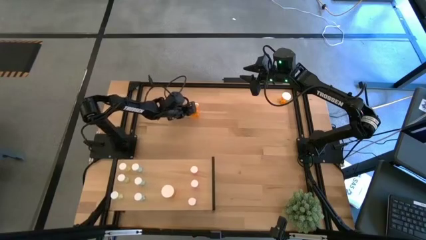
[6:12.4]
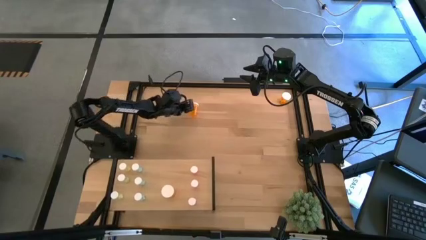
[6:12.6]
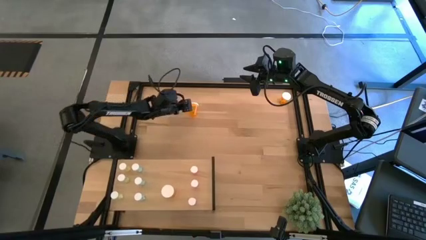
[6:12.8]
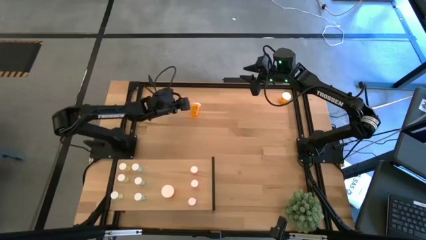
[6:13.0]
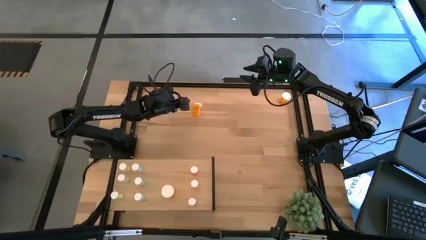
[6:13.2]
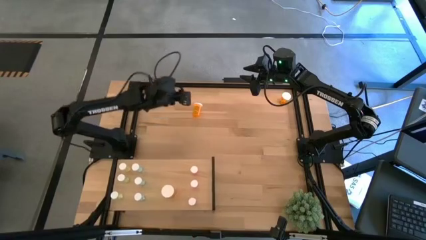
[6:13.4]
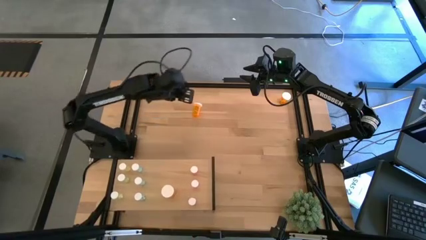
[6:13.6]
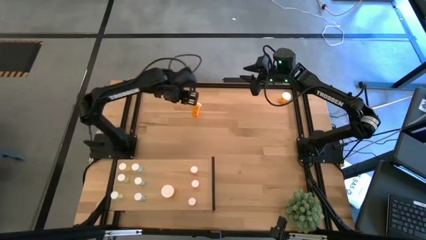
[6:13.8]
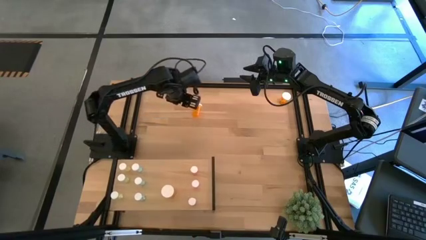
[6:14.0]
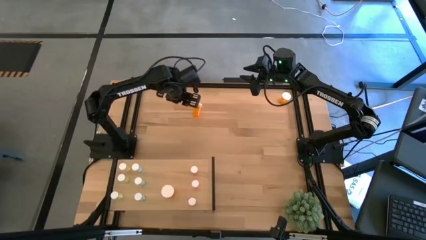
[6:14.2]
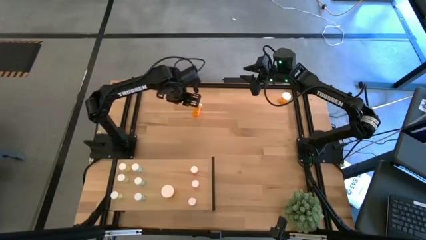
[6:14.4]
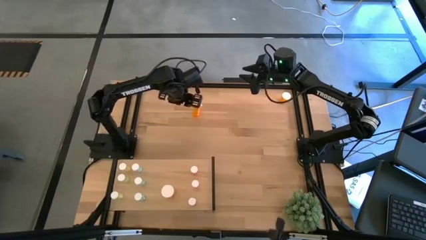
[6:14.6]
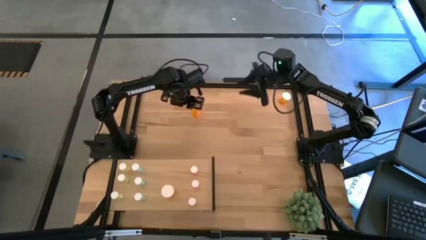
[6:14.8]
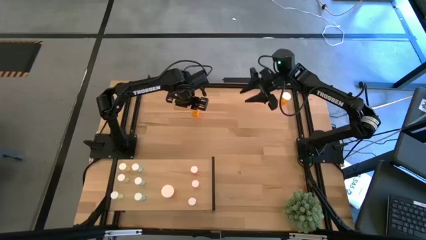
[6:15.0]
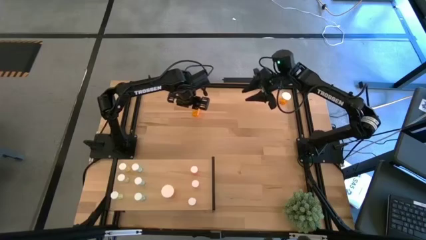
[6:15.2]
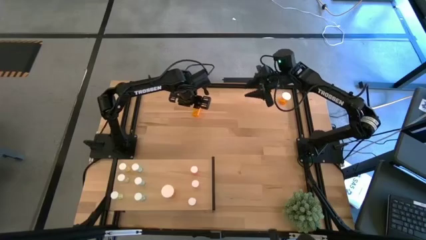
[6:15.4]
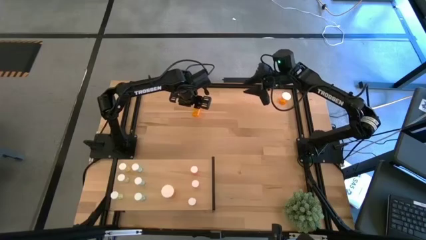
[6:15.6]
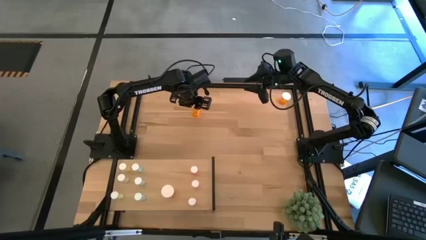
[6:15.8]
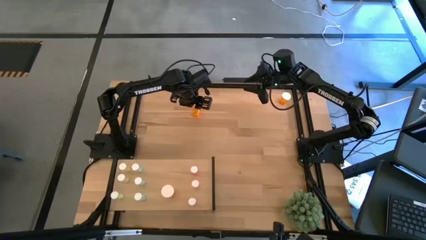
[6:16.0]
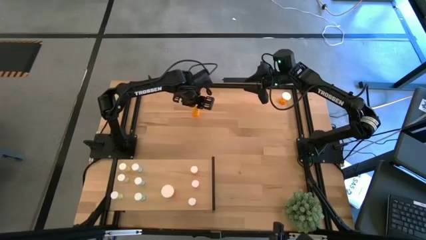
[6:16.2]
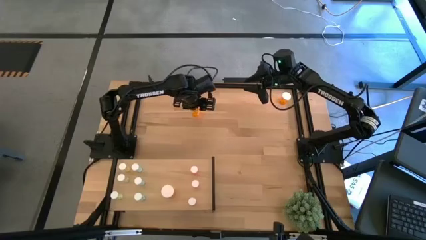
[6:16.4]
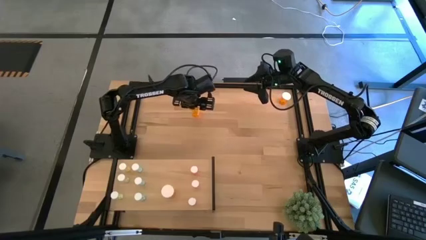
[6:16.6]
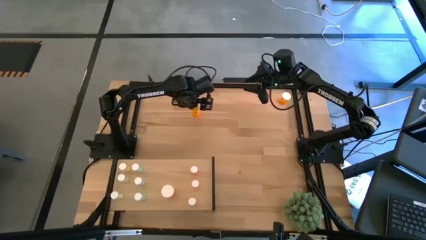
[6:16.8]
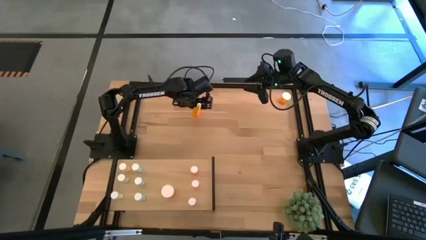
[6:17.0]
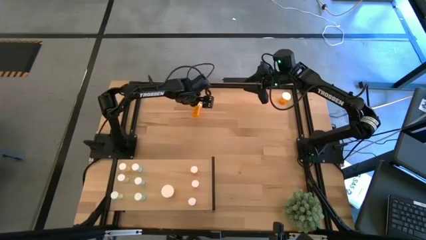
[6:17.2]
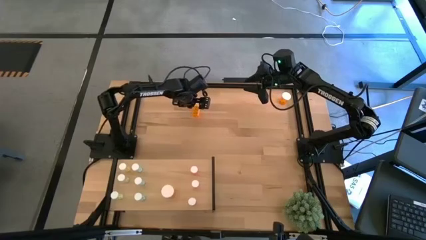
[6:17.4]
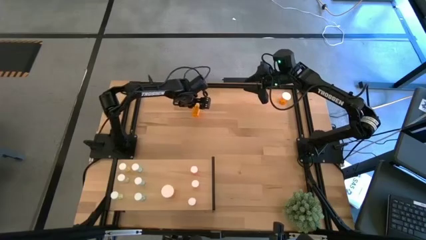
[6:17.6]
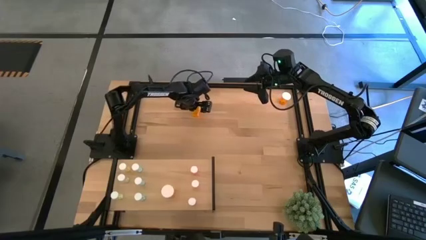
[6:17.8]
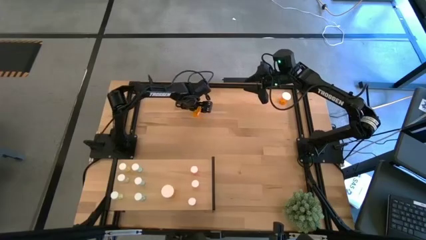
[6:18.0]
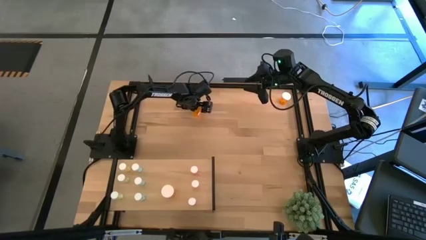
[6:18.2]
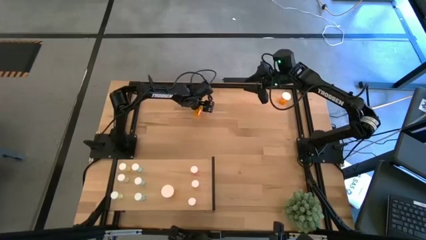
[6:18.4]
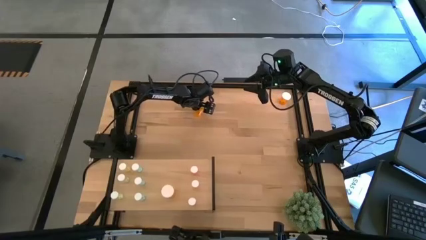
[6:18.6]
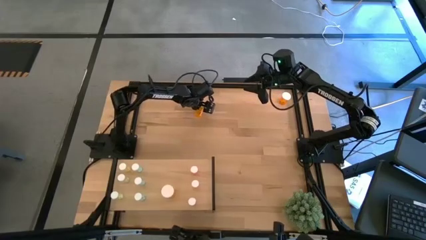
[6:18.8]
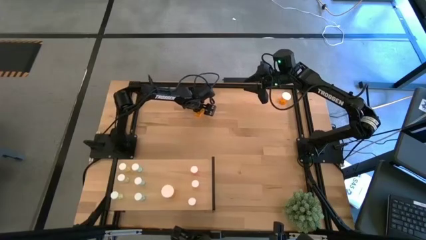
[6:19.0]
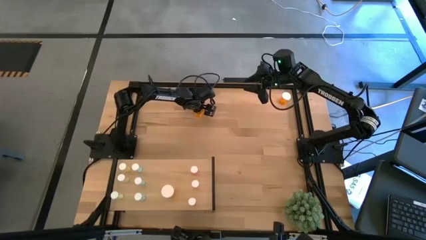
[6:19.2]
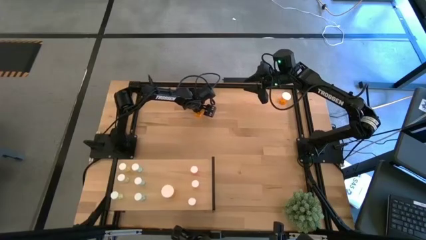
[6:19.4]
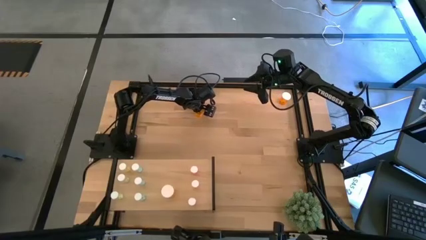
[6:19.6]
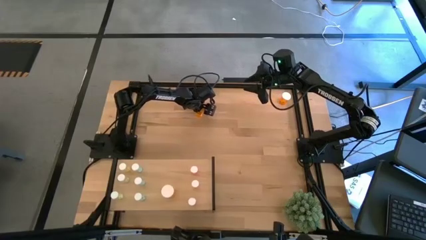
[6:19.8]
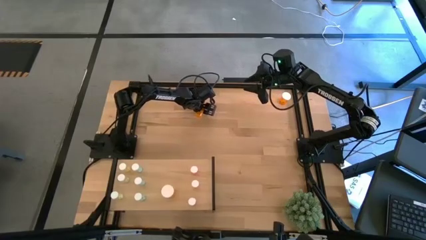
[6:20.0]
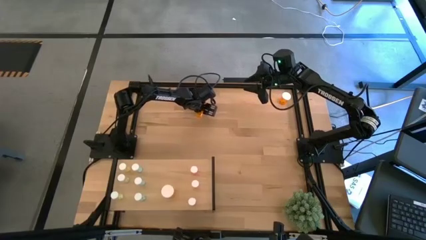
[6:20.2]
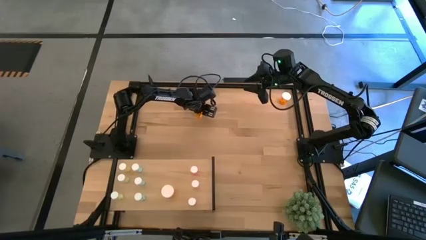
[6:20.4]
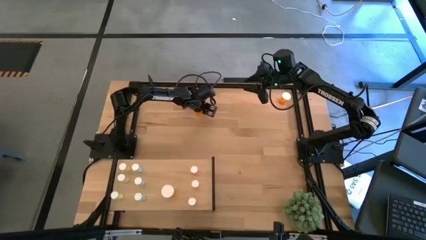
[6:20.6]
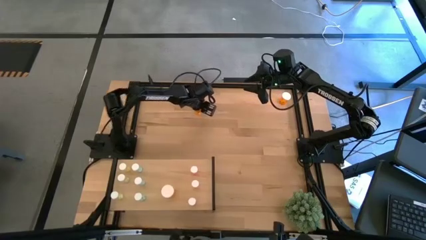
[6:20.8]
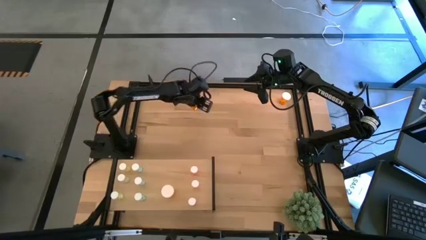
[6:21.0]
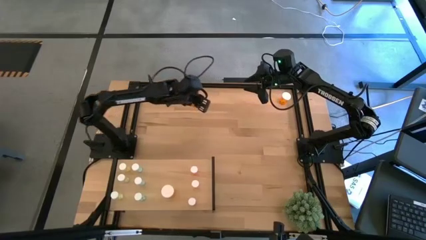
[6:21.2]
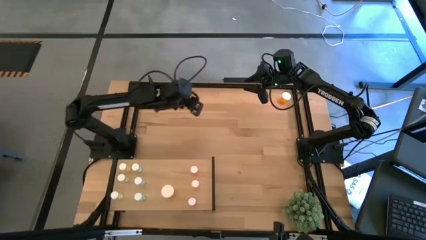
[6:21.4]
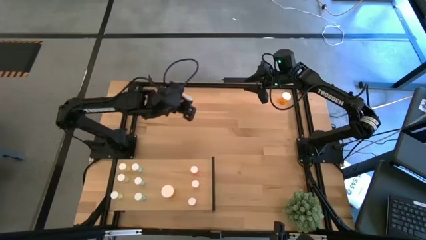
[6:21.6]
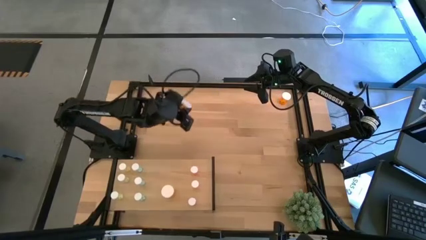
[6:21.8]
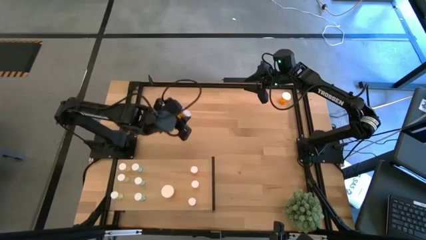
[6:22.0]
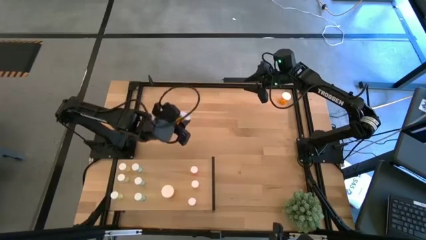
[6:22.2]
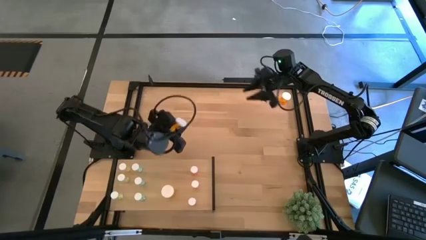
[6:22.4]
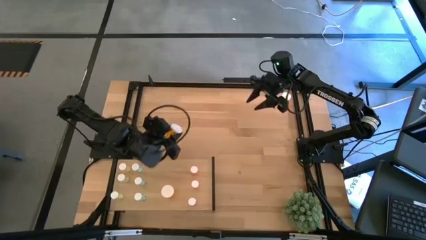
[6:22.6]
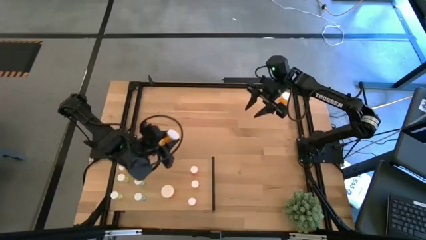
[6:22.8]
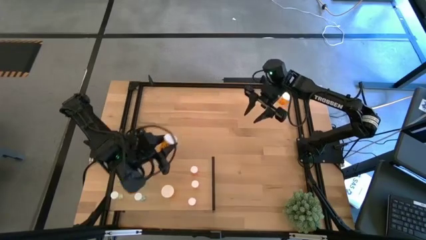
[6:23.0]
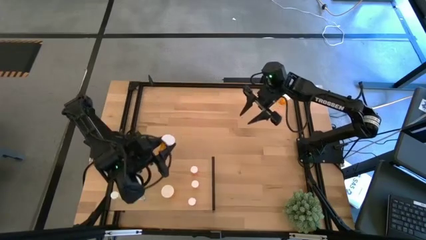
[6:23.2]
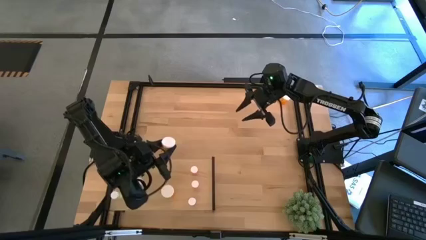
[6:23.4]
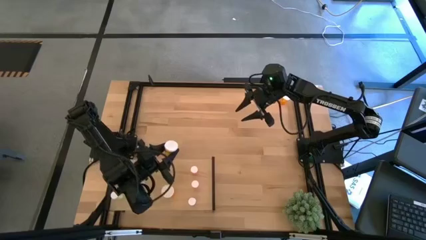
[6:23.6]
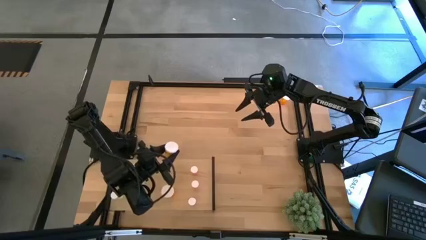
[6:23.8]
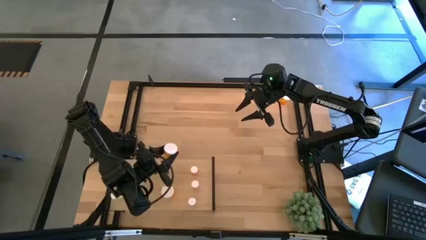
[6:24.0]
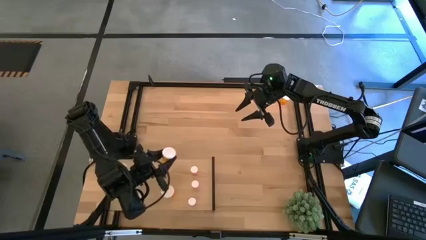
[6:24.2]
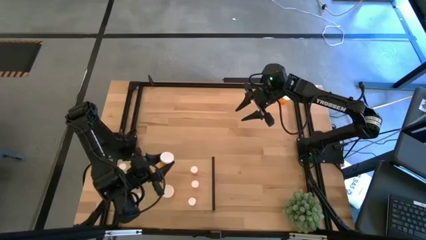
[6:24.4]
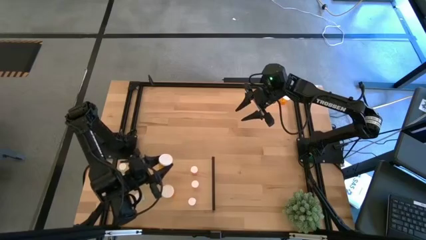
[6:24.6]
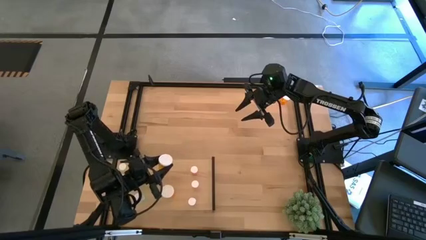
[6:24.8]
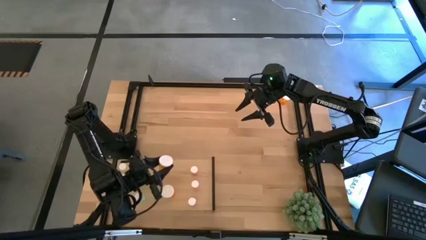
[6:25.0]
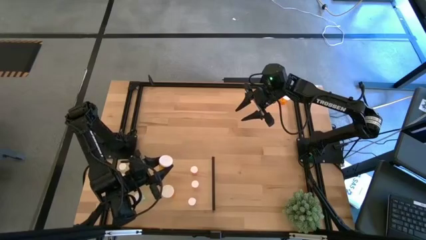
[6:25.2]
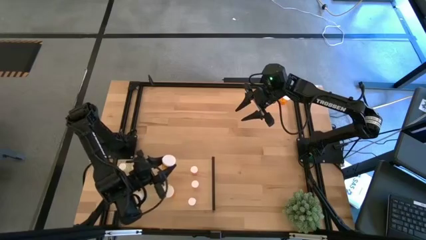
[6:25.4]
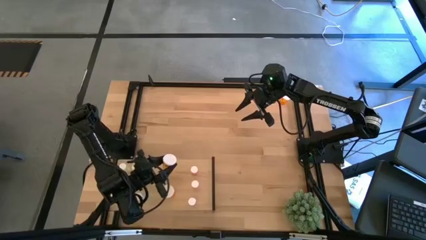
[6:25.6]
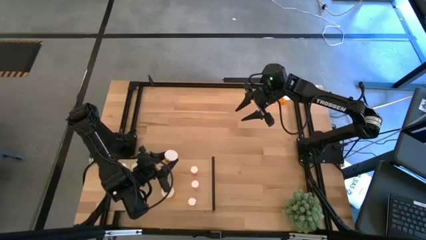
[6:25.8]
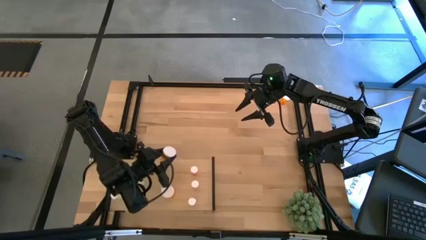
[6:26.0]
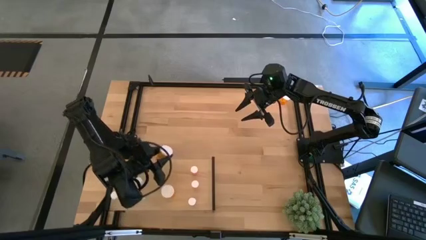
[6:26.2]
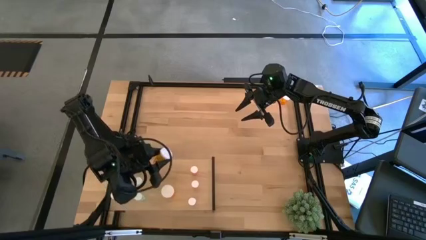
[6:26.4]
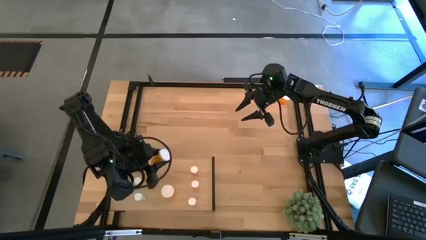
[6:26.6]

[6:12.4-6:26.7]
Task: Pick and place medicine bottles onto shelf by color
Put the top left orange pill bottle on the shelf aligned with the other orange pill bottle

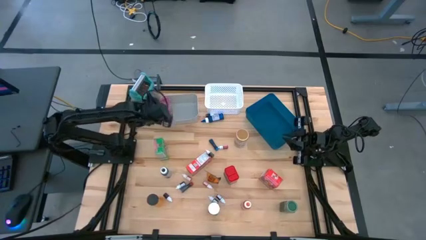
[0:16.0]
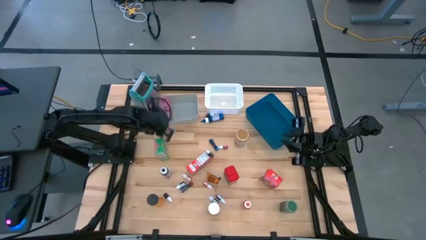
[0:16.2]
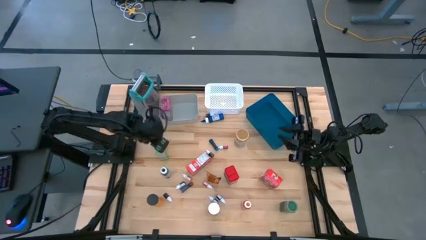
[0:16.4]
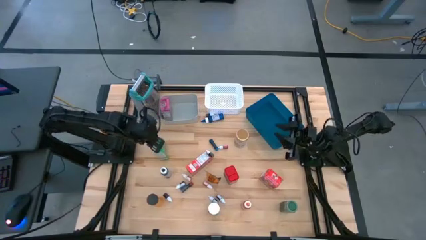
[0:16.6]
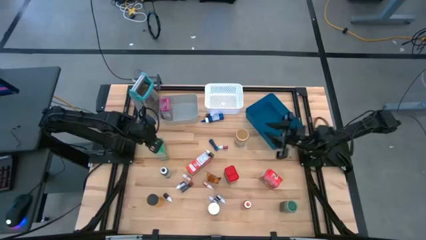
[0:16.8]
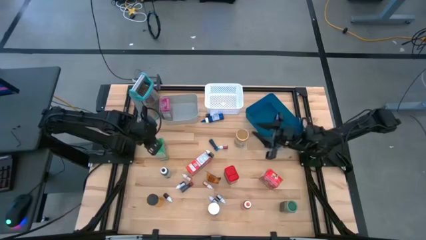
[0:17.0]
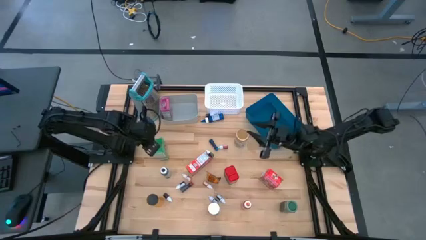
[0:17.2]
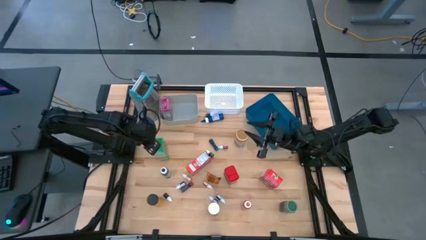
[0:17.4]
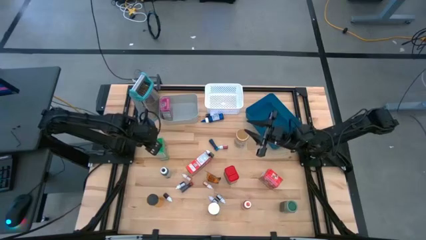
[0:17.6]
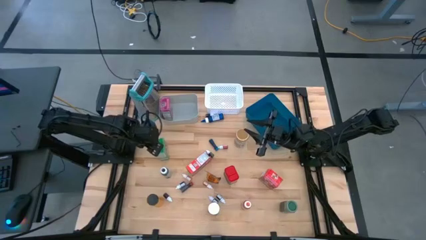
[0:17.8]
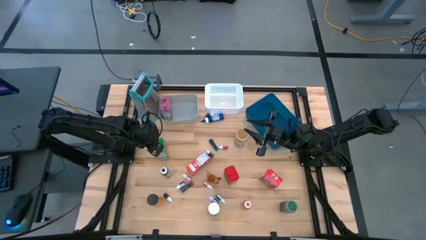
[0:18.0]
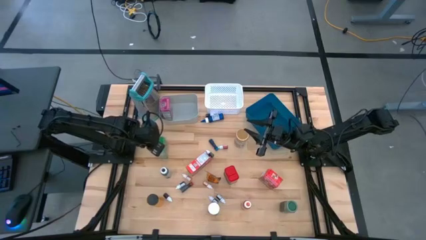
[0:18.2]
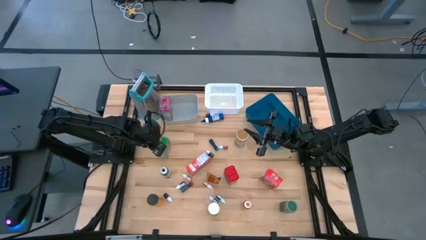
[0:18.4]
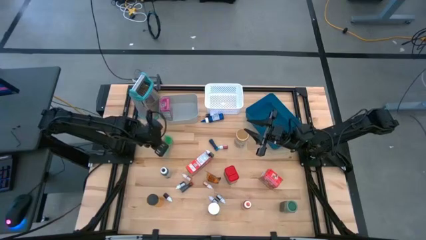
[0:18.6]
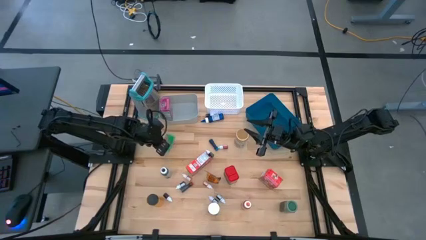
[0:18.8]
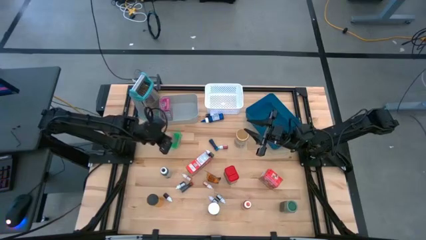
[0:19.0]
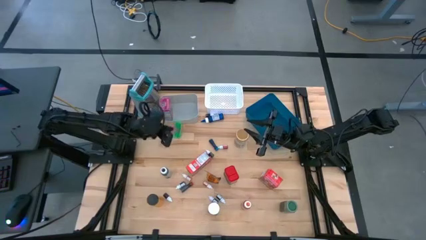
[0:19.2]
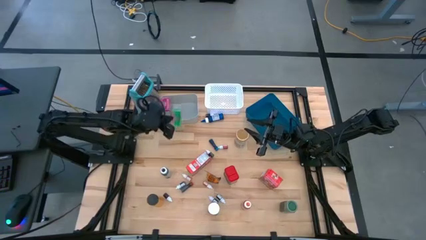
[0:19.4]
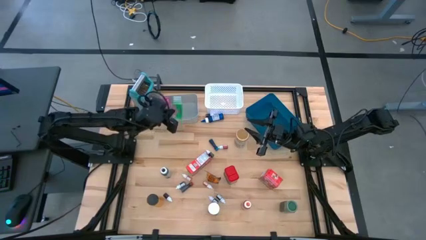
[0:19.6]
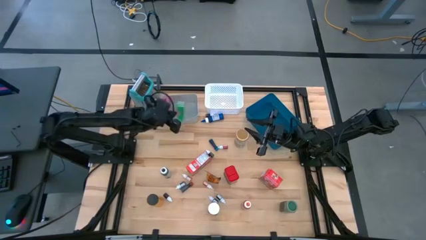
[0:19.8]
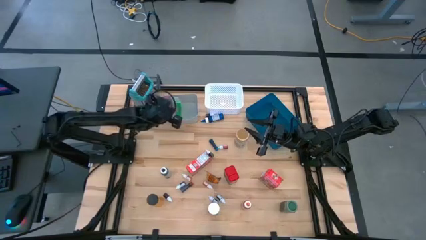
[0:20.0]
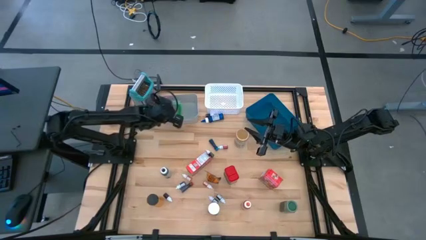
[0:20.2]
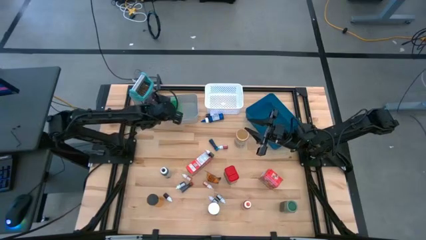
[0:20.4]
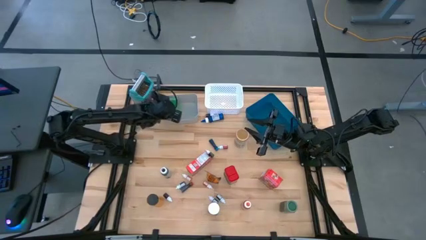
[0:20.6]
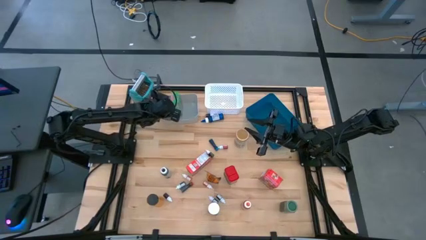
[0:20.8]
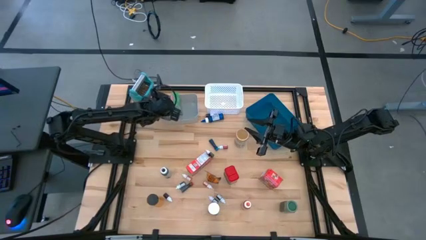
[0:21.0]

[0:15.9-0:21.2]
Task: Pick & Place Kitchen Items
Put the green cereal box into the gray bin
